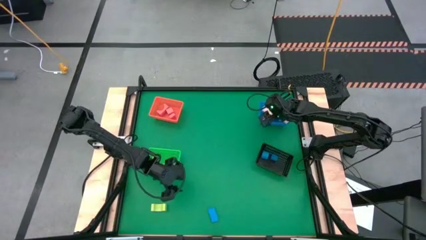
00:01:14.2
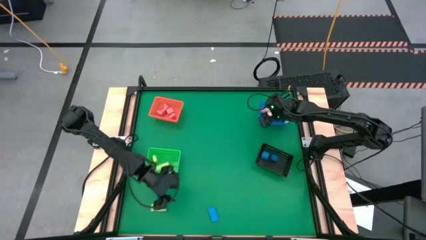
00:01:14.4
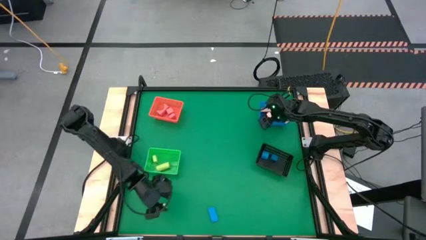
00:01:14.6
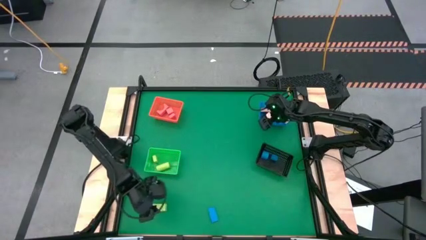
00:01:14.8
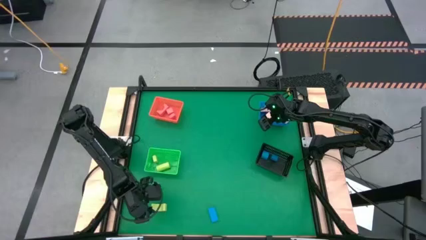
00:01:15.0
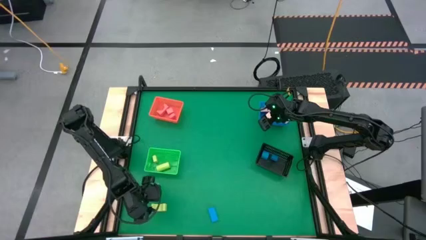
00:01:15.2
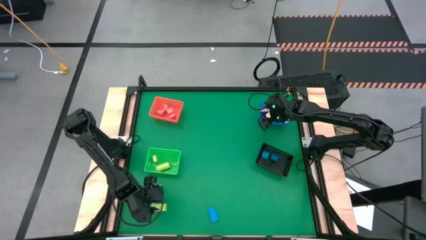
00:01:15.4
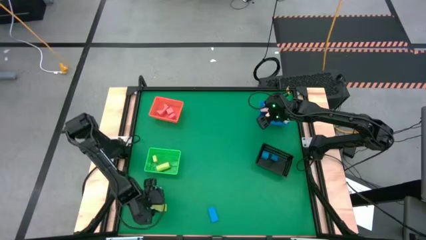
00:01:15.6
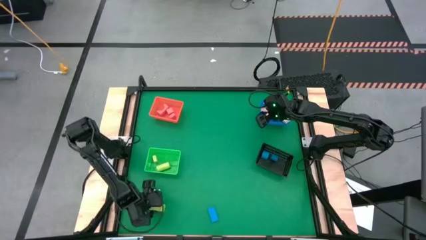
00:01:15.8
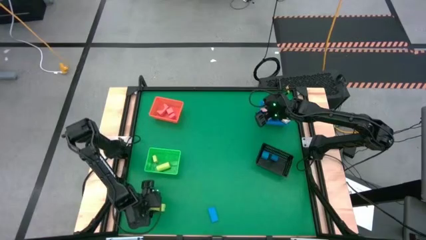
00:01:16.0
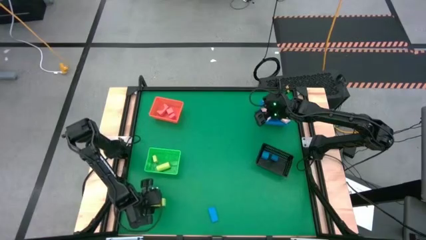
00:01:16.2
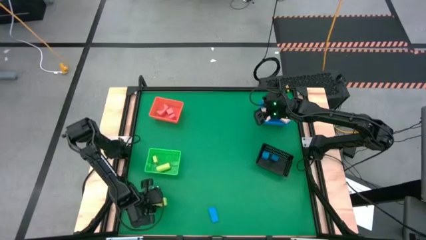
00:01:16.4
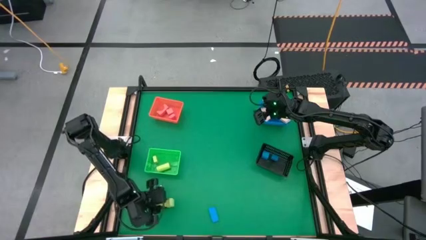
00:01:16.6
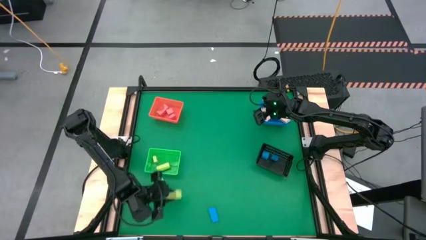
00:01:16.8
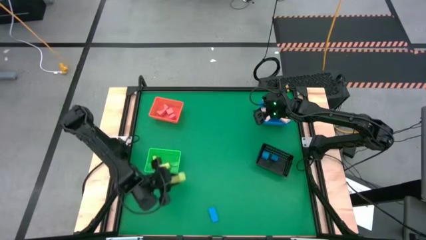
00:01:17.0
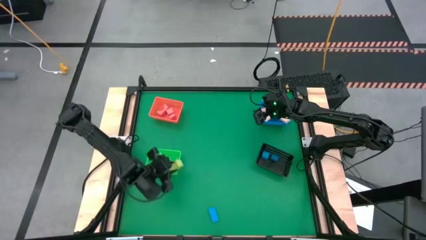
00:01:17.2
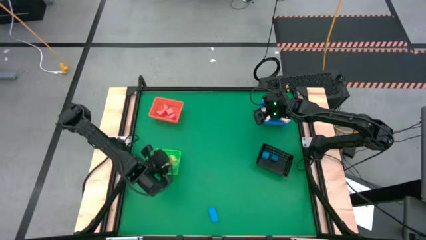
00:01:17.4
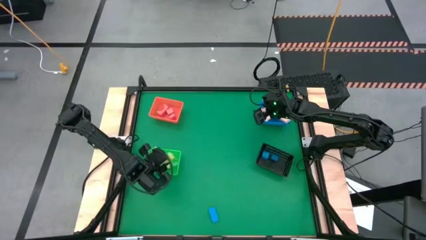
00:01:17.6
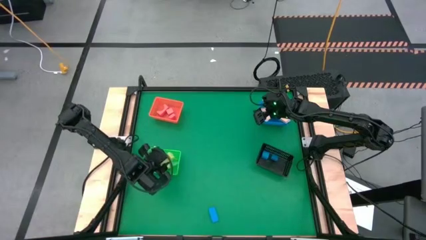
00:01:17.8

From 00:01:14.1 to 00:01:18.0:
Task: Sort & place blocks by color
Put the green block into the green basket

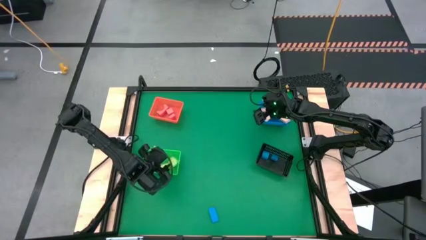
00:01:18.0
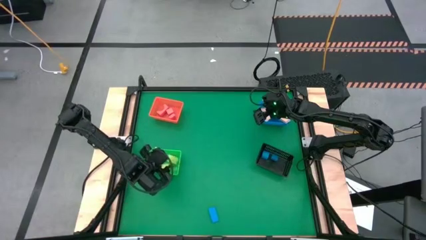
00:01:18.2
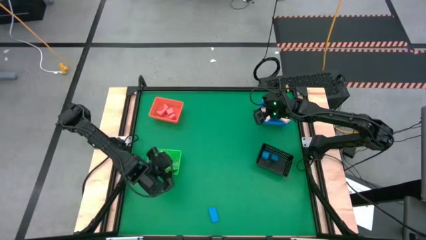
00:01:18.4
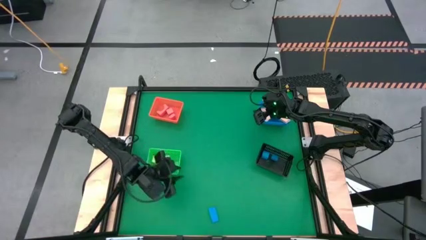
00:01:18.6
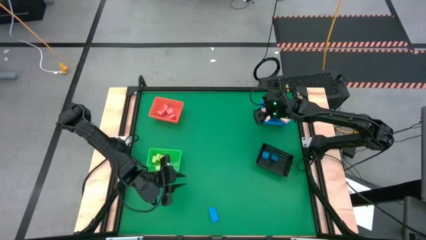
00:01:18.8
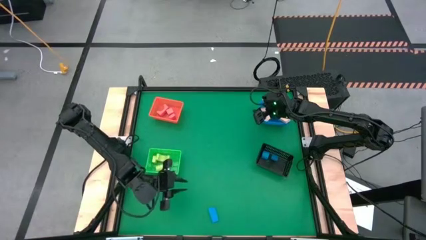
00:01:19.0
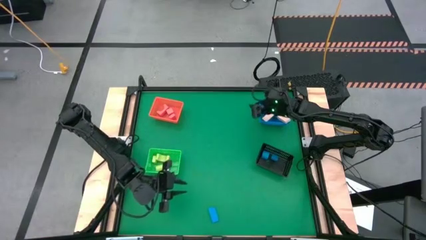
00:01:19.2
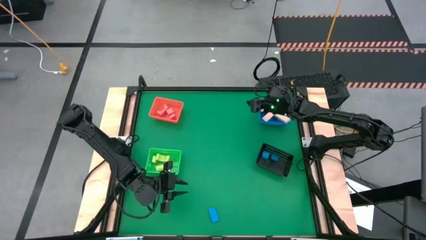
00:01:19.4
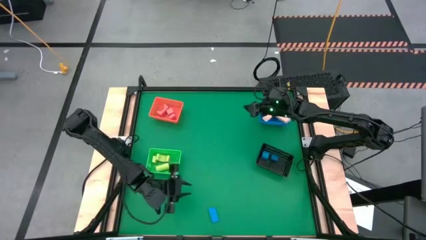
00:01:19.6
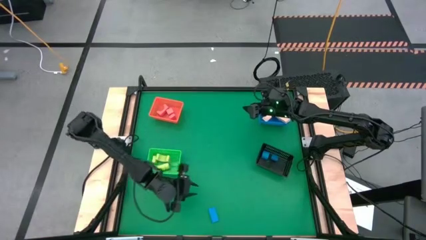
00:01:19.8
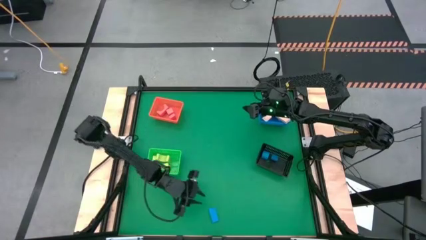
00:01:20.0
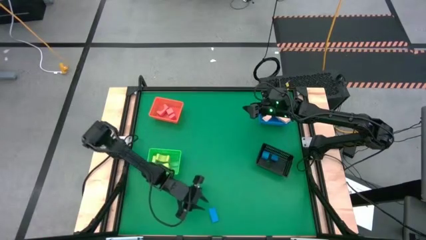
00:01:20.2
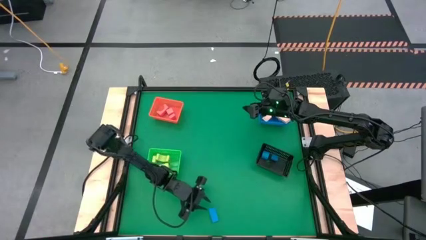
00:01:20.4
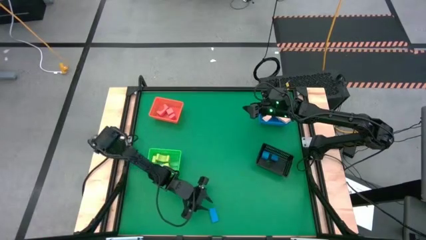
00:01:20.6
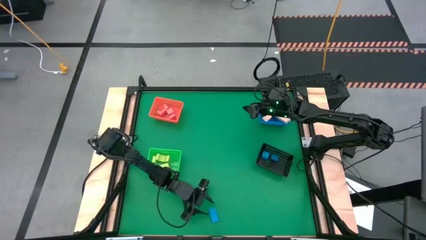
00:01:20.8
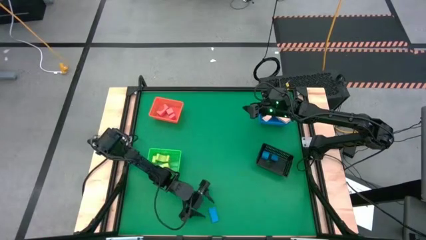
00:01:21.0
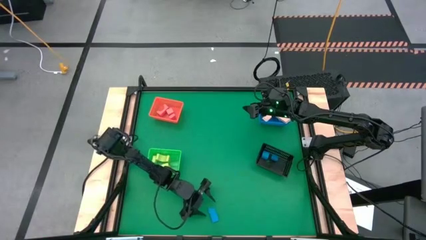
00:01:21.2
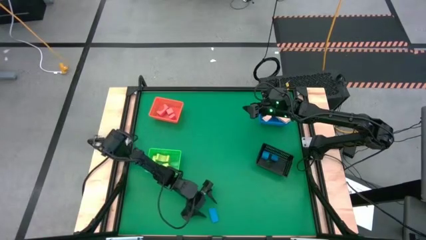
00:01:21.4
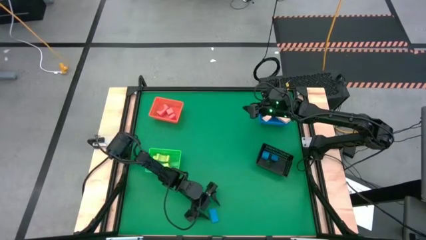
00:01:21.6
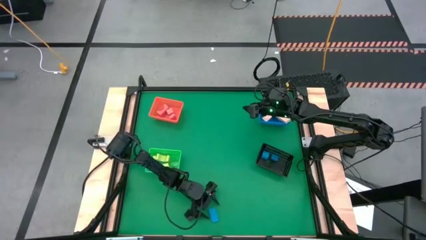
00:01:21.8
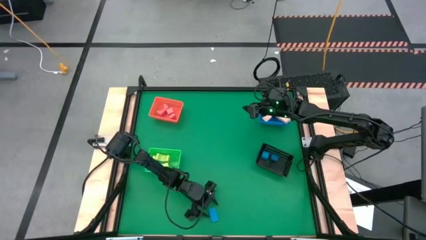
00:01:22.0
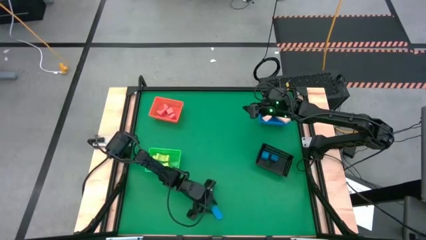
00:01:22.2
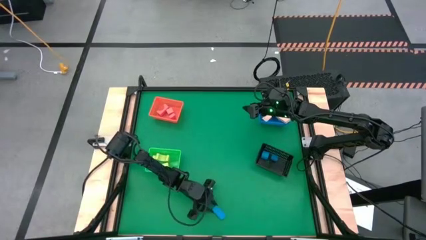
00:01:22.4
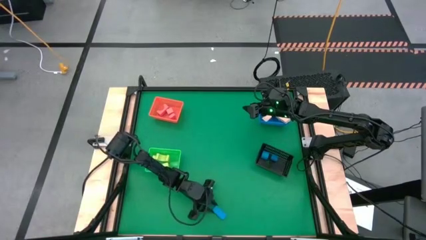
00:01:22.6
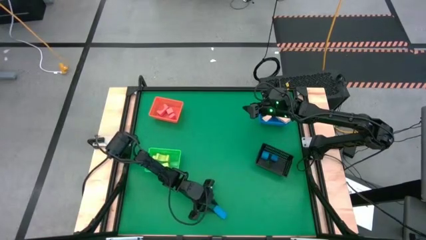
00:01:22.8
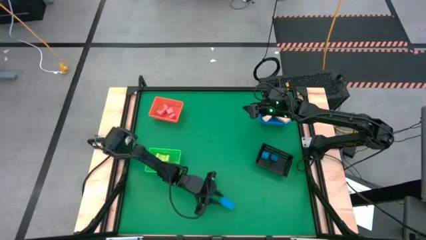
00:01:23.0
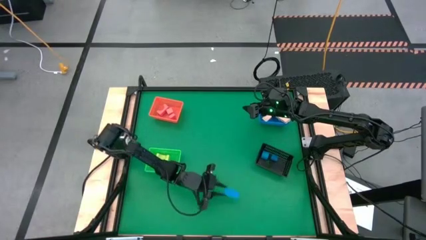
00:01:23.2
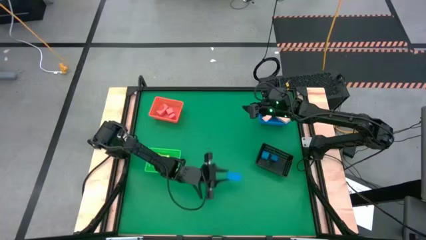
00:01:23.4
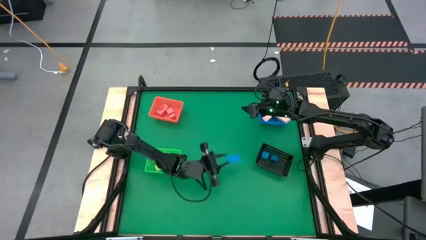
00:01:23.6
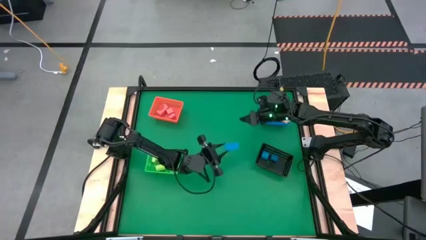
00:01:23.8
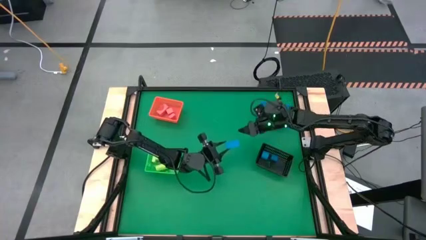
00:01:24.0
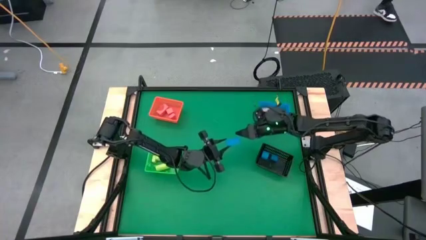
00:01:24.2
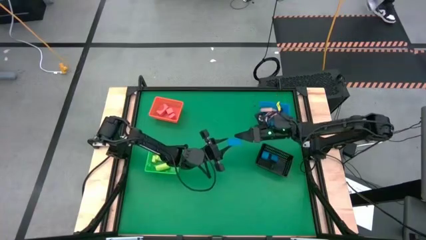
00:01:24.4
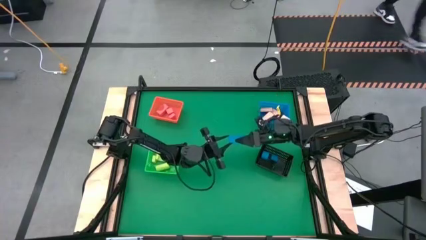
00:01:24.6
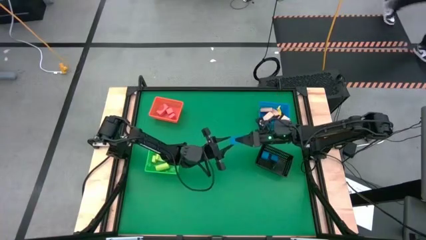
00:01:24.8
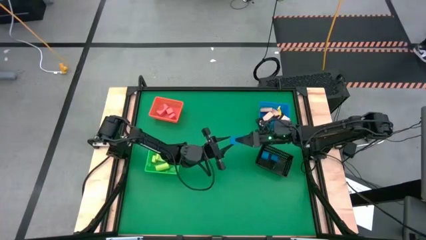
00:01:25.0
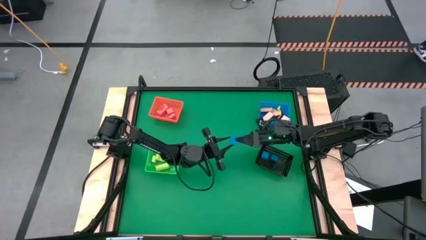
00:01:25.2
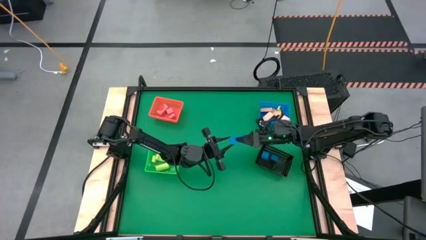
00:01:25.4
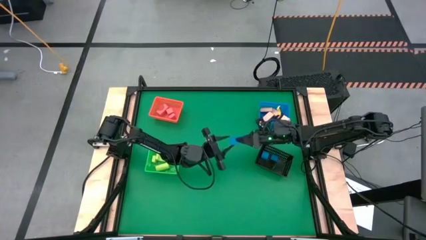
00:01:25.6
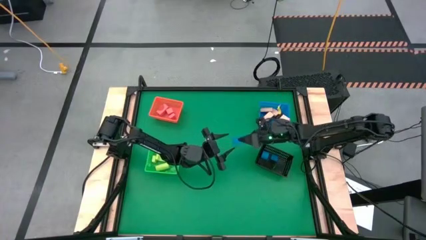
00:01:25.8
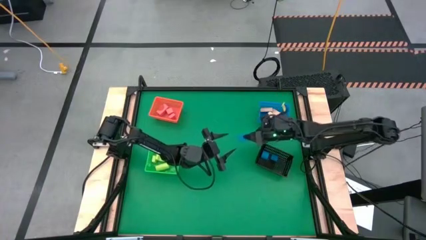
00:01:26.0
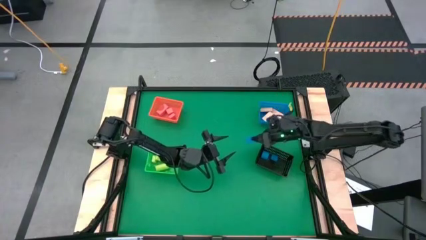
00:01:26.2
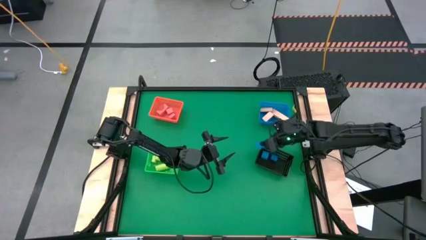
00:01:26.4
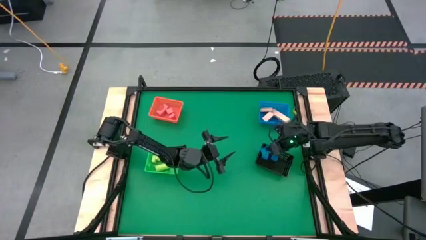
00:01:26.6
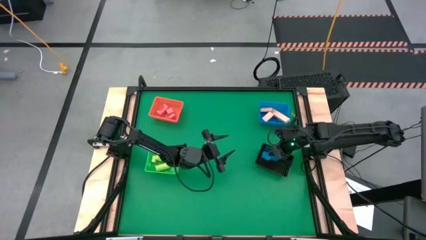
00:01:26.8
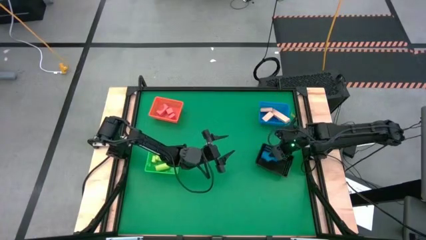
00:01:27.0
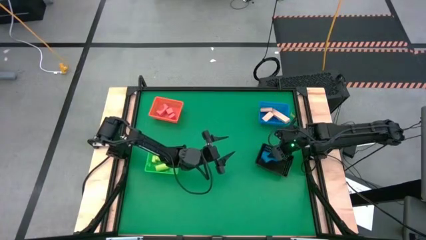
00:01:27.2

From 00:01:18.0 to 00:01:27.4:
Put the blue block into the black basket

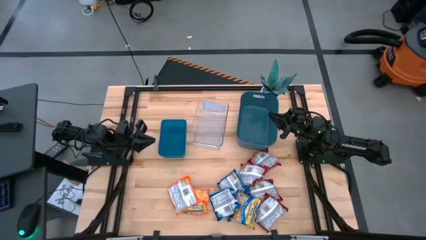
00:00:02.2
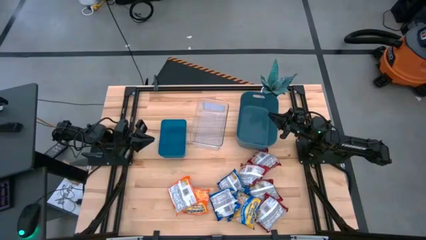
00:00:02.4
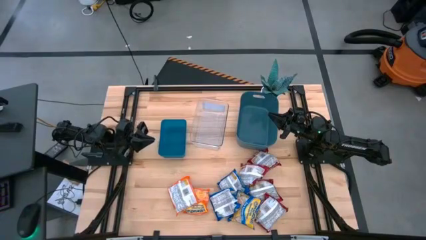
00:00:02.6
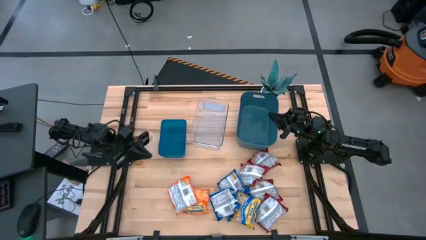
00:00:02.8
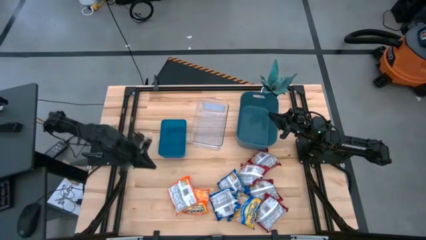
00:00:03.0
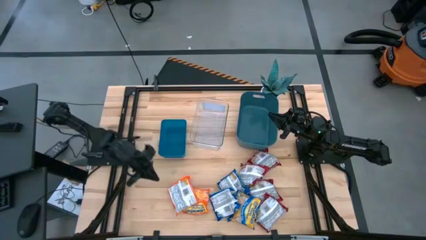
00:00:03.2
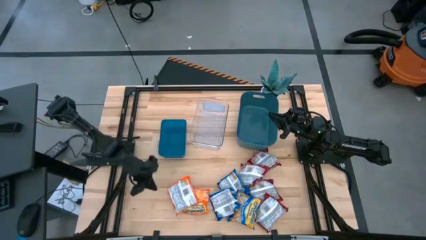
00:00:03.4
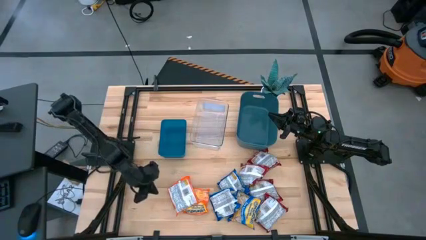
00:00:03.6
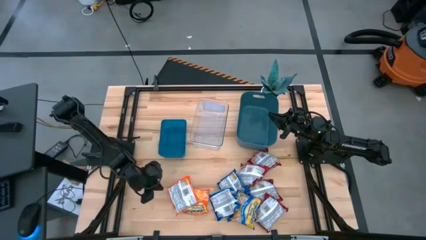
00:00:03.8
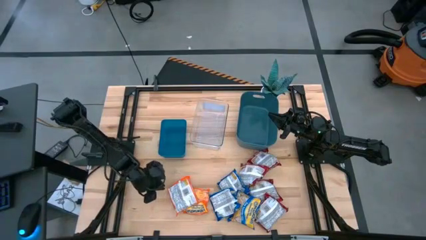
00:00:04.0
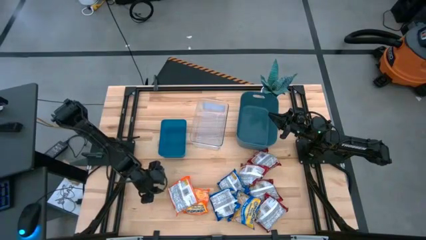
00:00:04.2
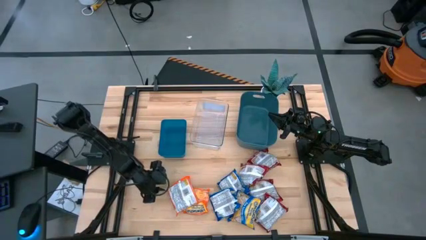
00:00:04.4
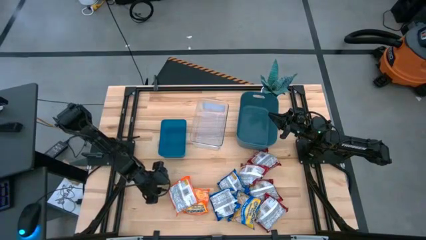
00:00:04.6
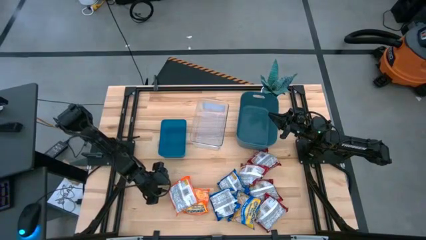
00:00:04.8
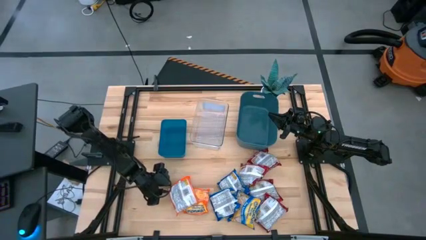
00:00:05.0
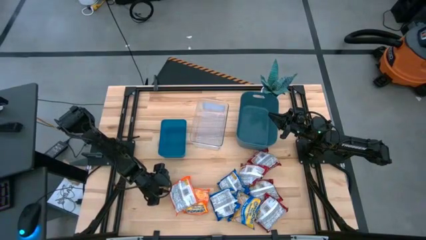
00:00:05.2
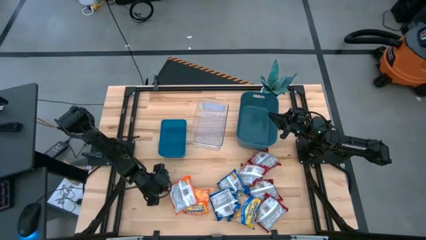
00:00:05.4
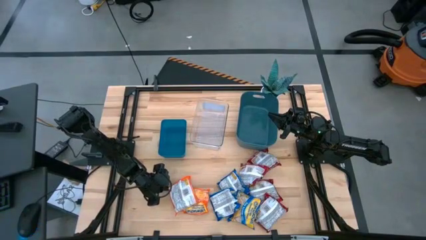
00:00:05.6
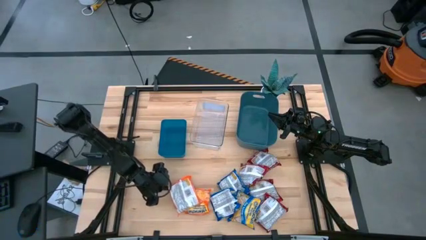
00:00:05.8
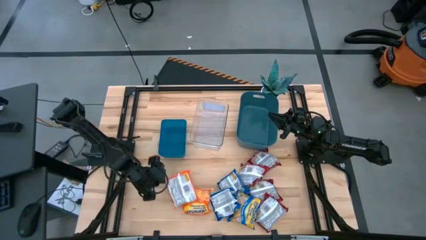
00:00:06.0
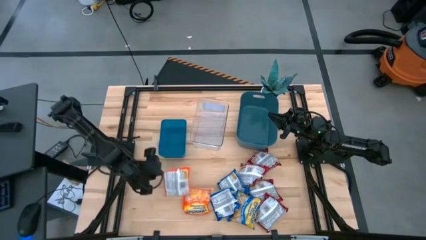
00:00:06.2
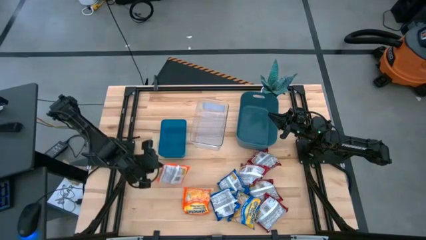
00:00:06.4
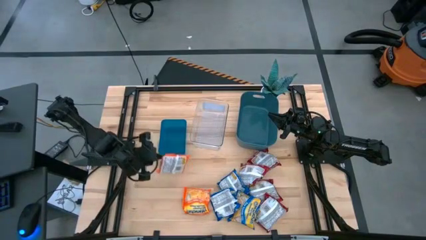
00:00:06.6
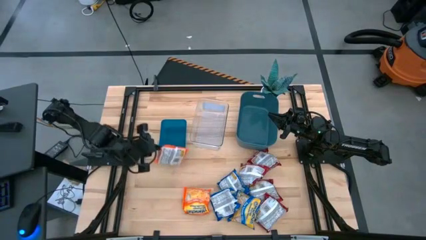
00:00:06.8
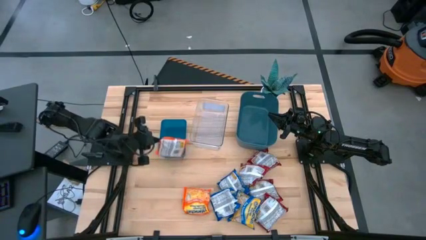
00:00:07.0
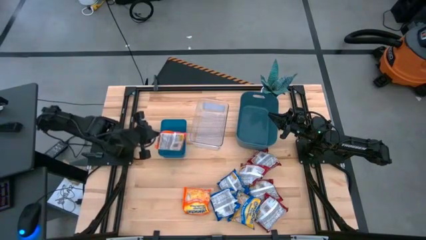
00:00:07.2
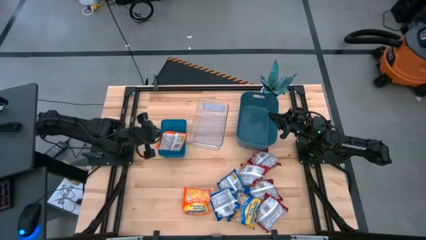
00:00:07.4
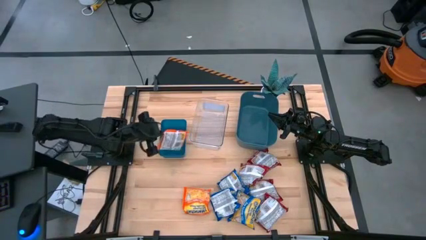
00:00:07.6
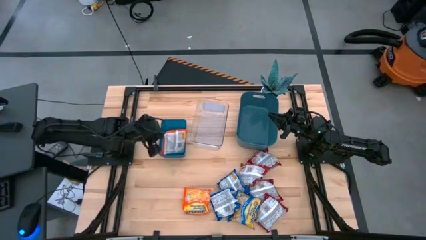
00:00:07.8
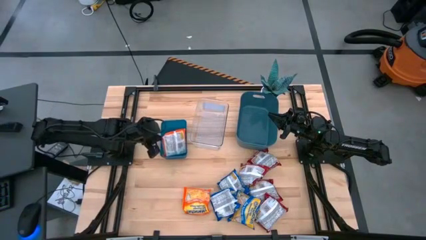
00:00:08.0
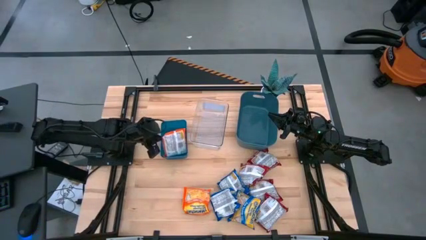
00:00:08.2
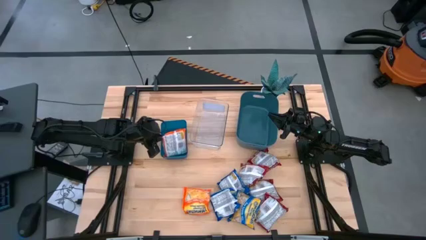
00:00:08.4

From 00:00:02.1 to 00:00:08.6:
Task: Sort Maruchan noodles
Put the orange noodle pack into the blue bin
